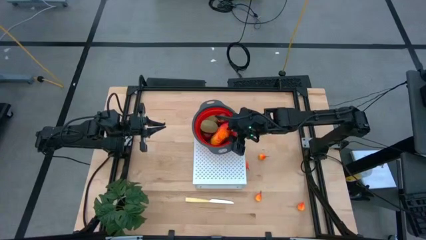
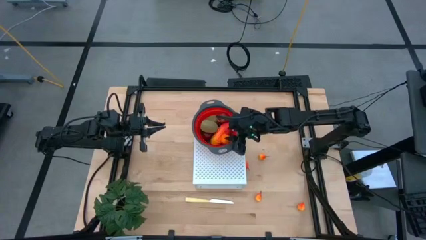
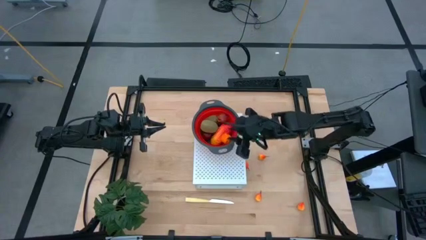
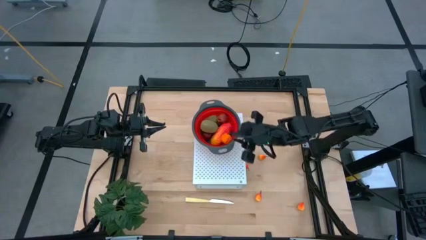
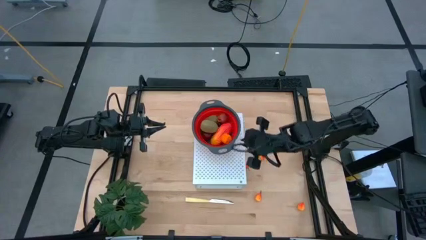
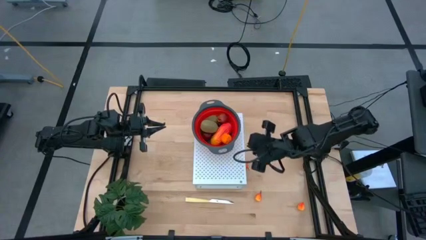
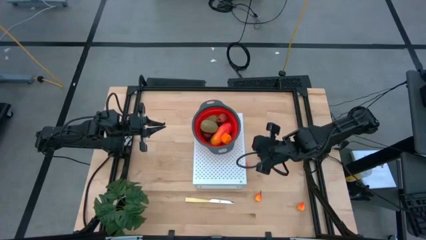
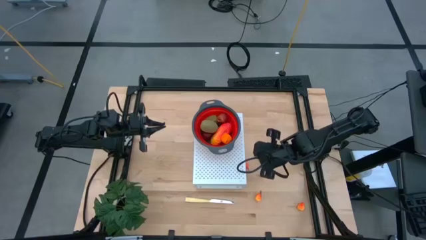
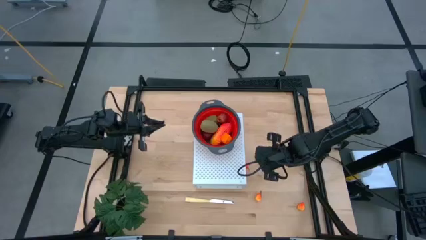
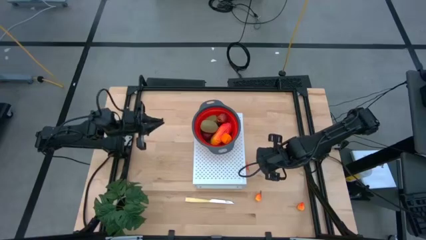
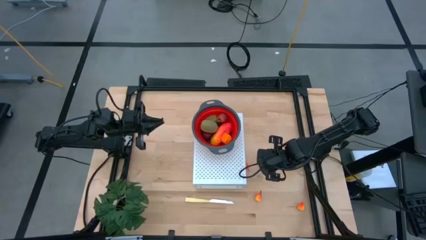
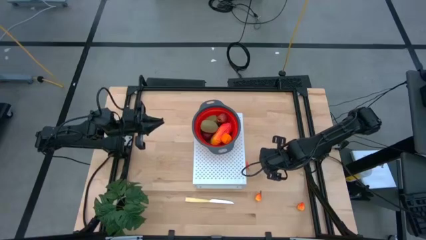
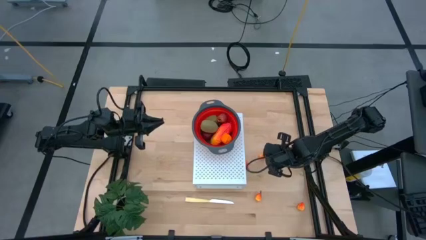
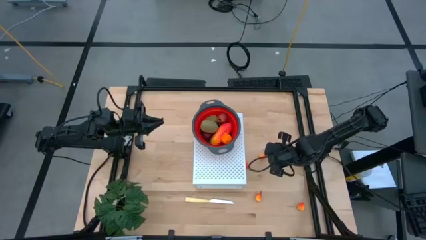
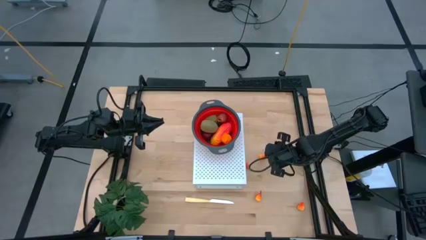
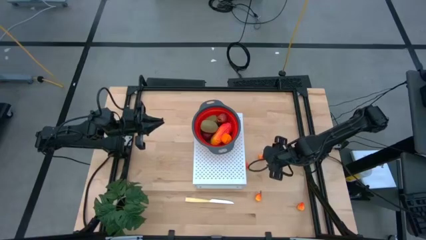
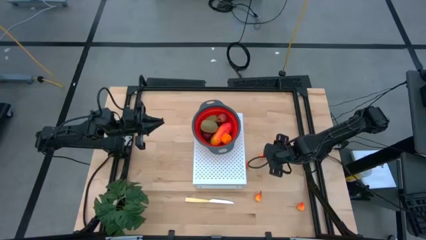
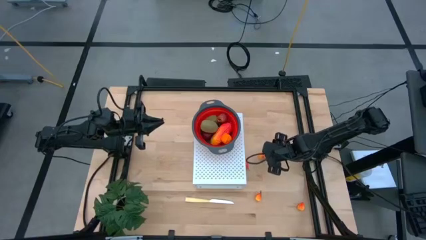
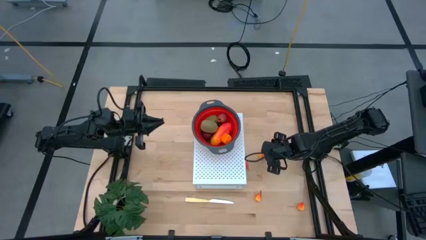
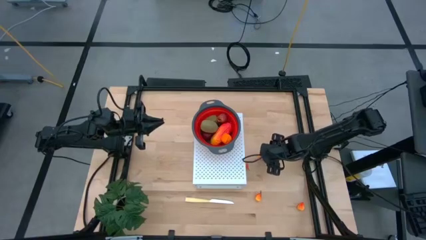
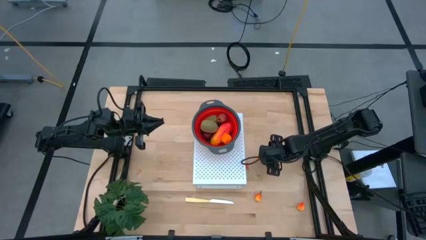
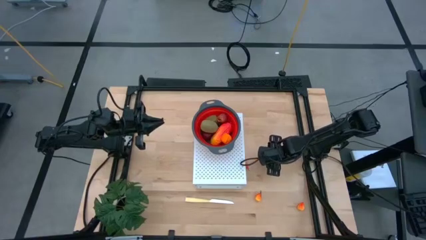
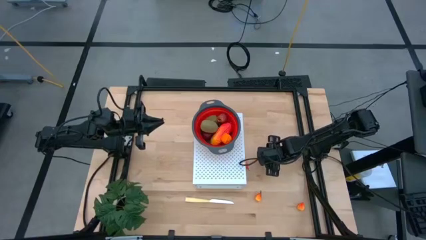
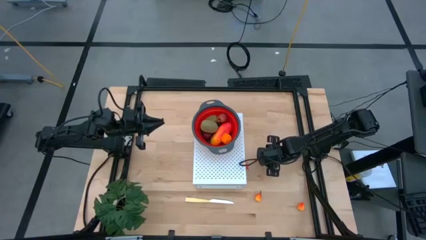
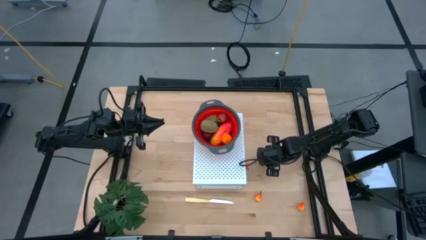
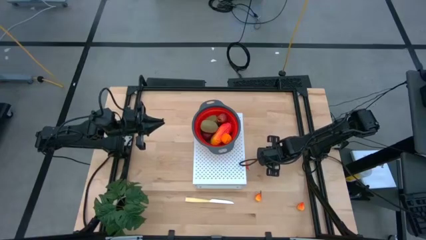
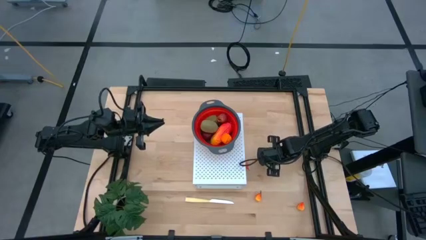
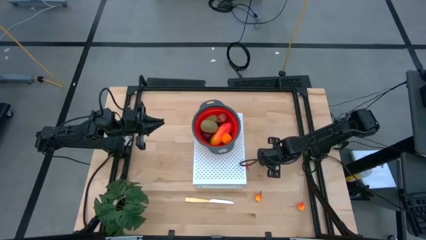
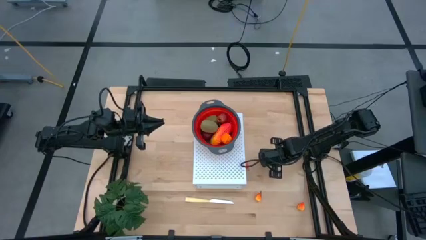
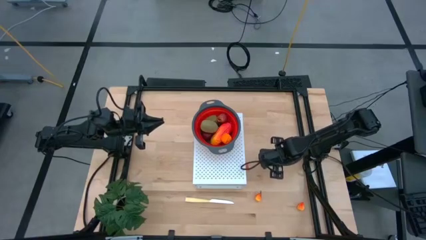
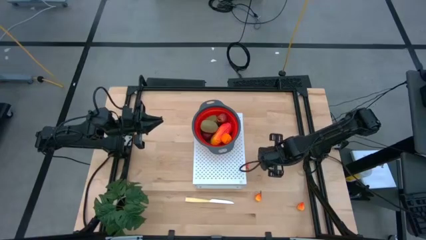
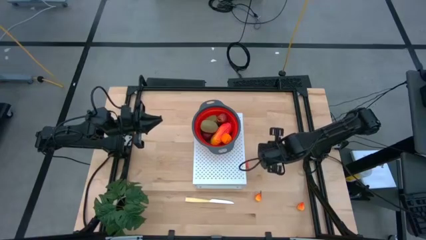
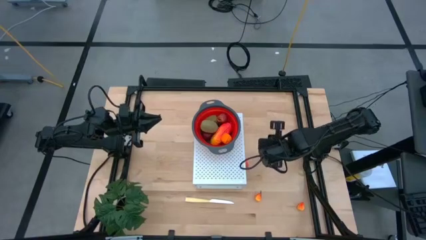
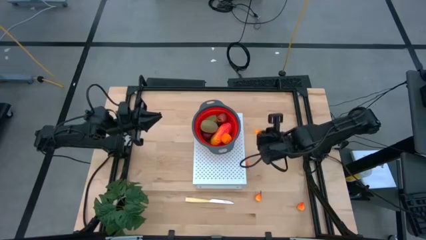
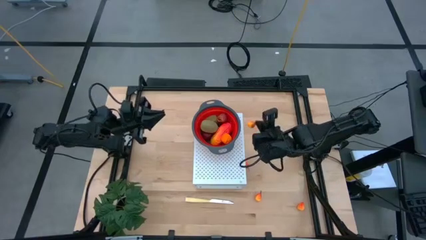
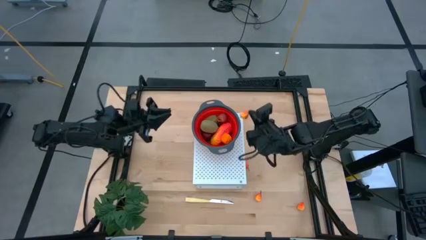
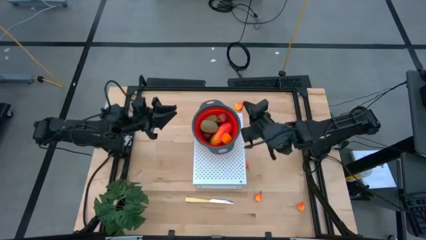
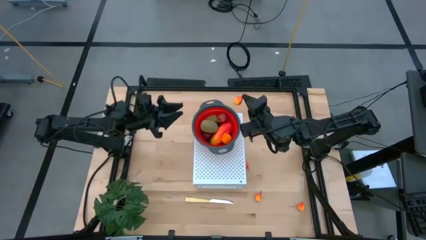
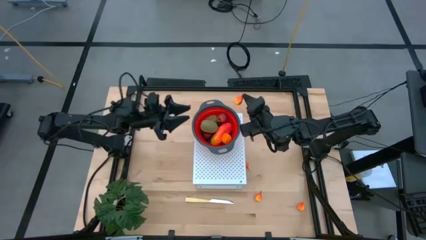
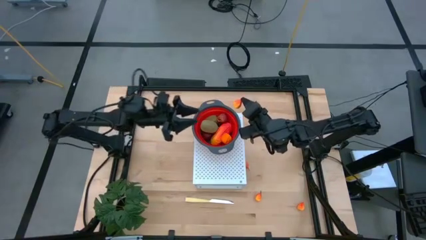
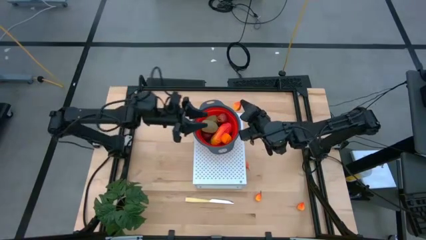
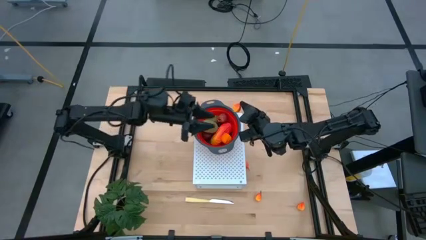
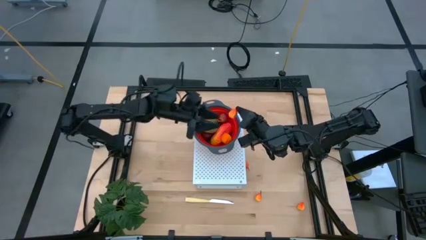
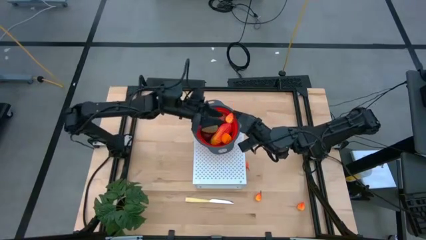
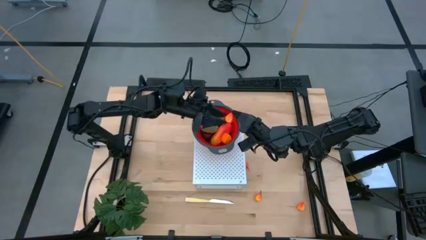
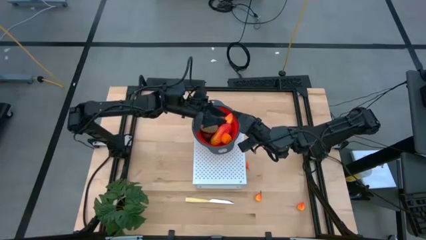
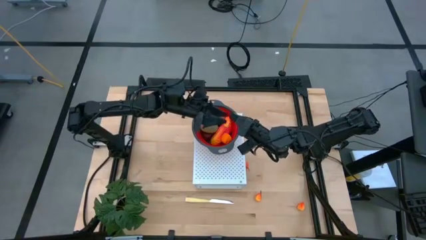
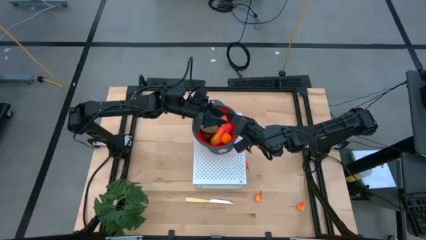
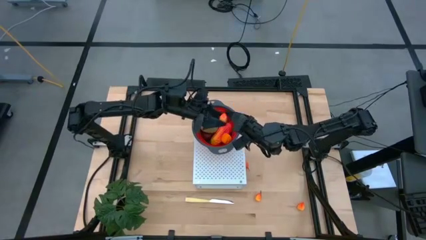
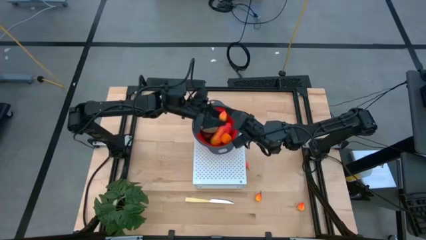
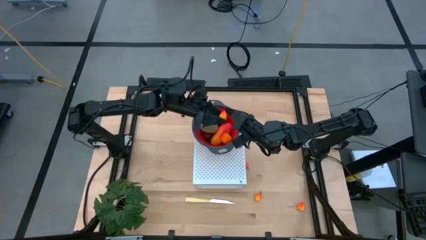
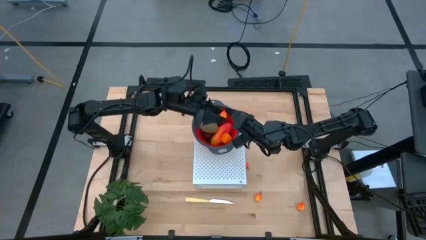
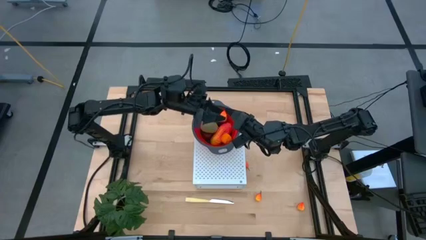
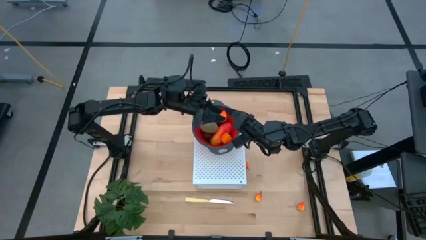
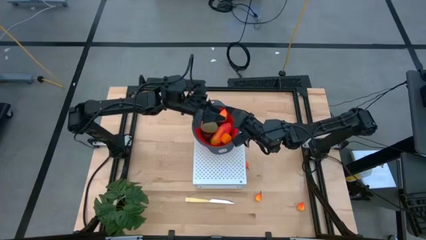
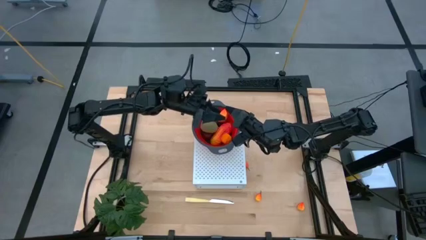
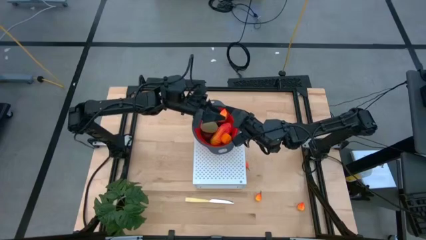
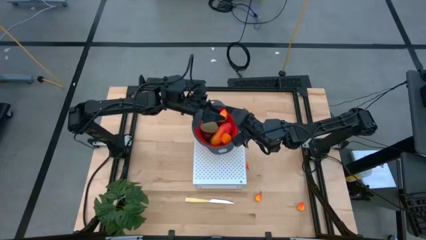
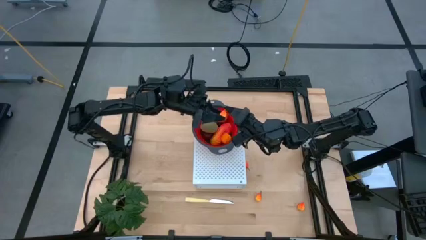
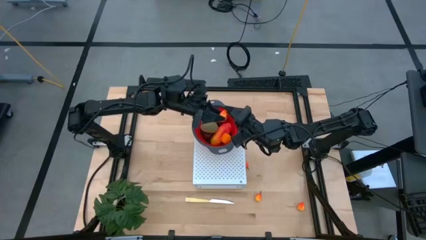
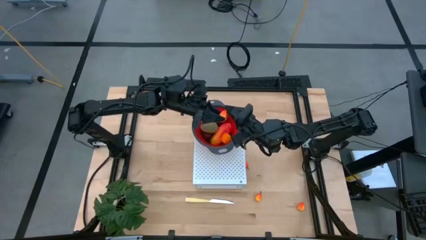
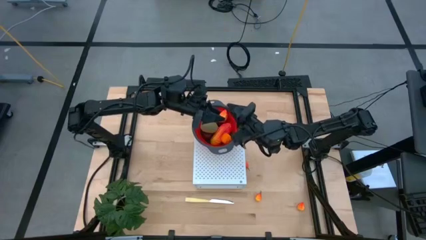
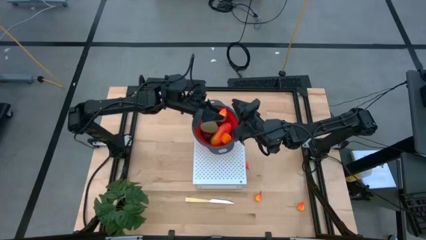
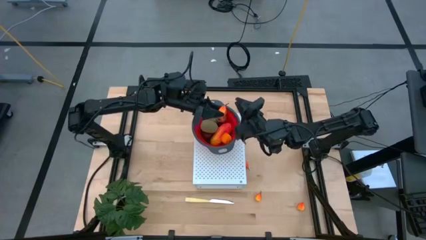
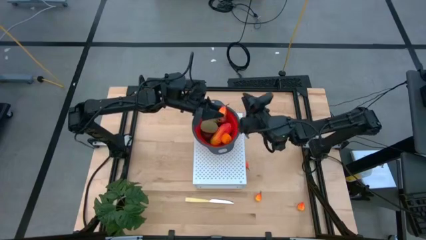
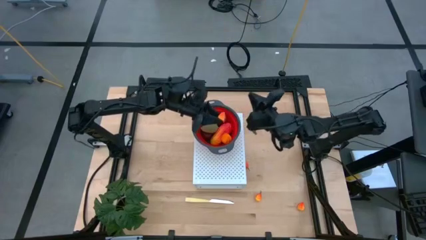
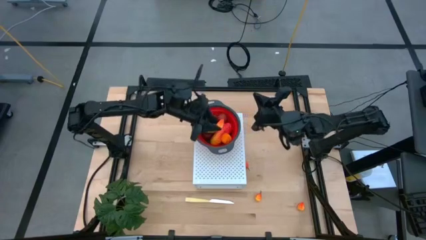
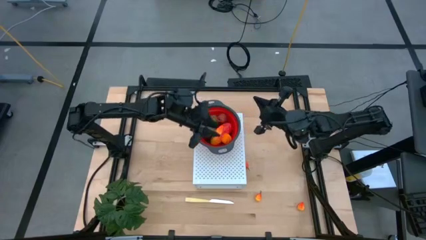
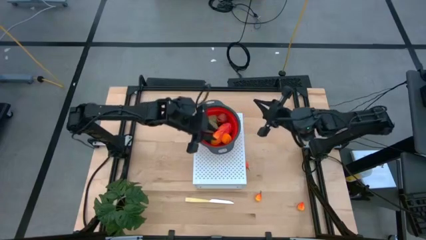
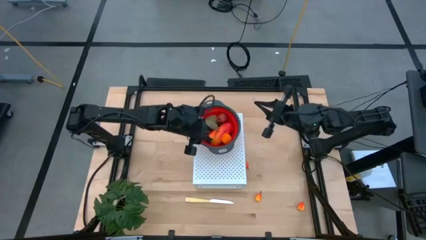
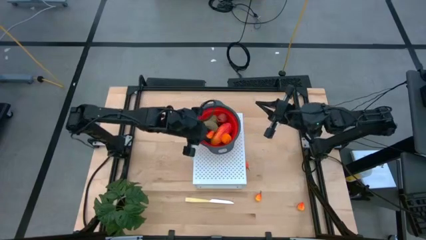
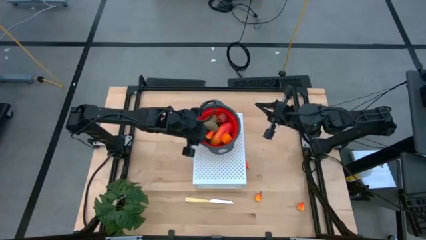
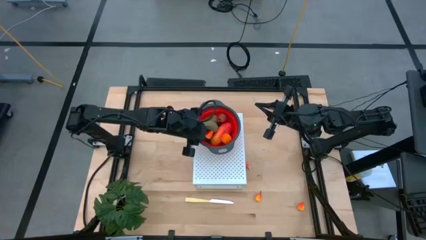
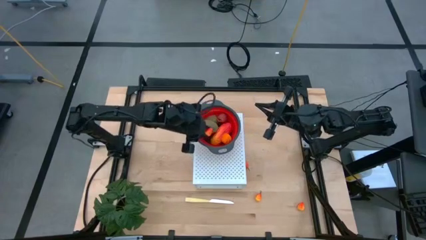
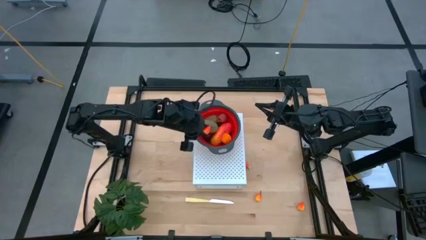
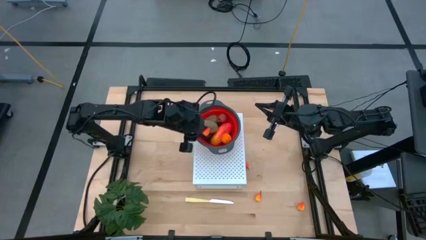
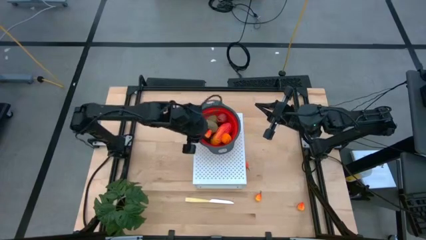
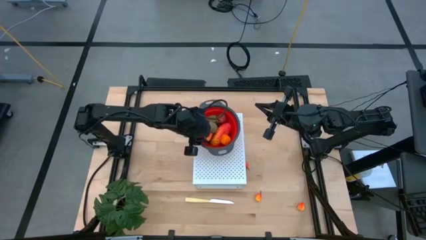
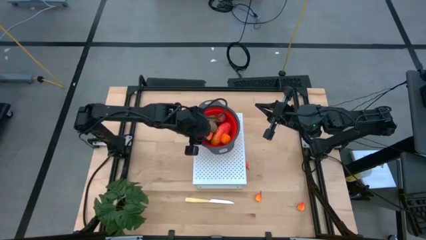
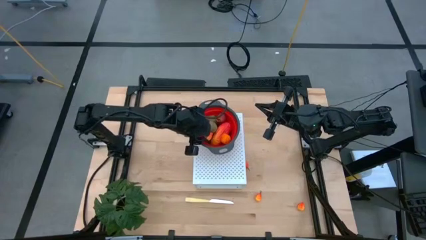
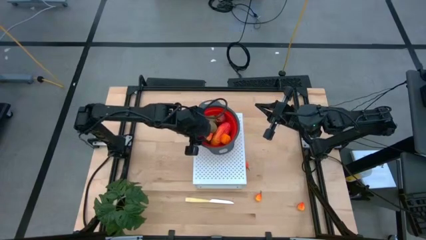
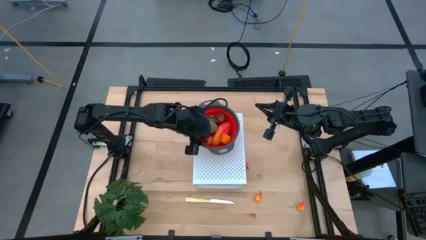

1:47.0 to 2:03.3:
Task: Pick & Place Fruit
Put the peach into the red strainer bowl on the shelf

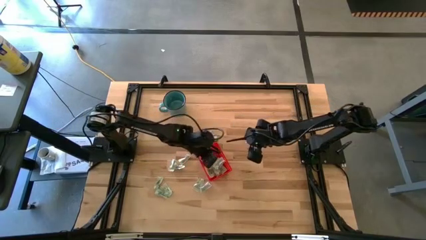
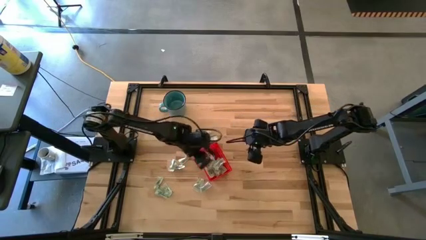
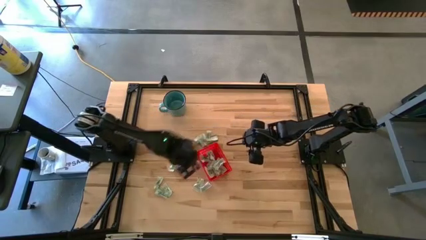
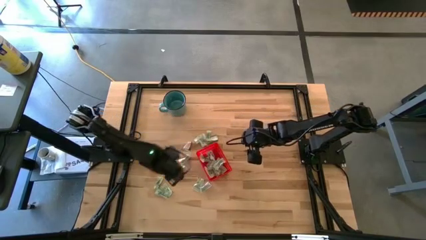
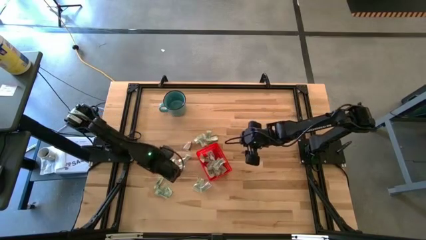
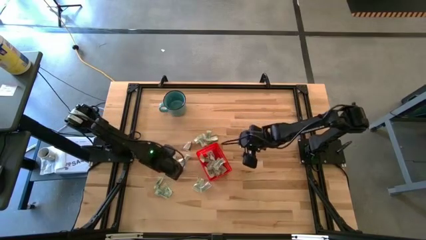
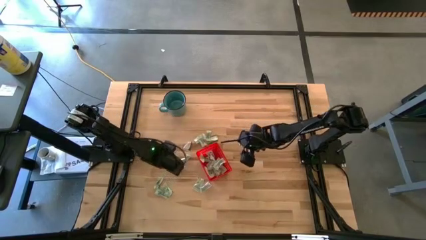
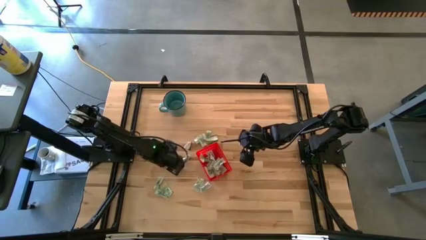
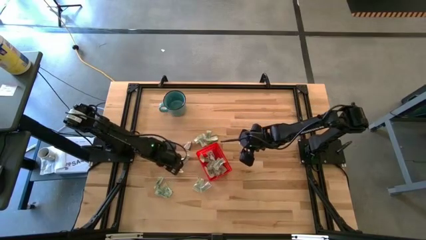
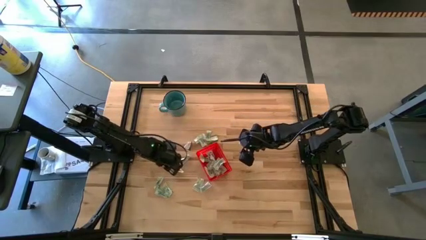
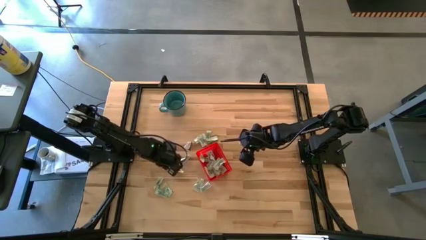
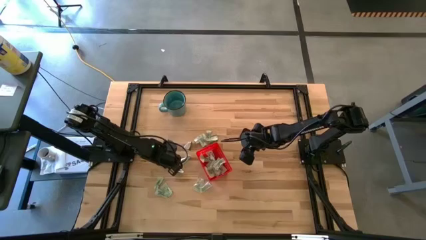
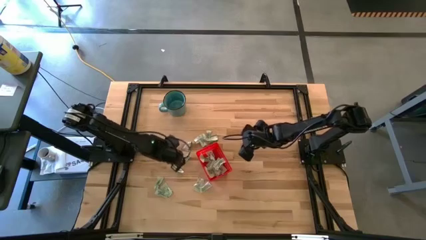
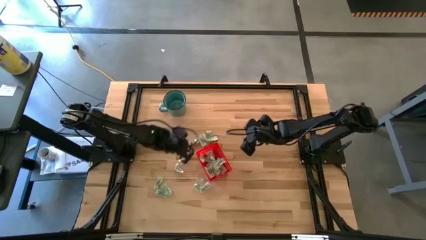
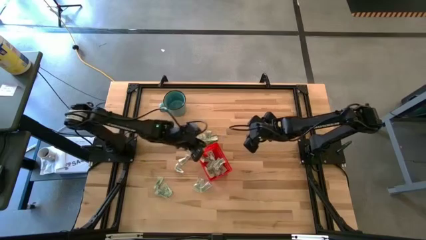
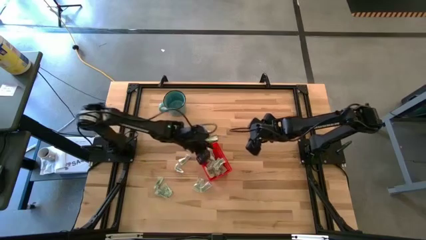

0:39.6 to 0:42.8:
Task: Pick and place Stevia / Truvia into bins
Put the white stevia packet into the basket
